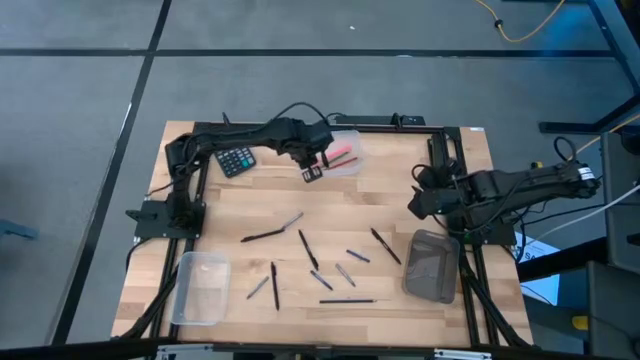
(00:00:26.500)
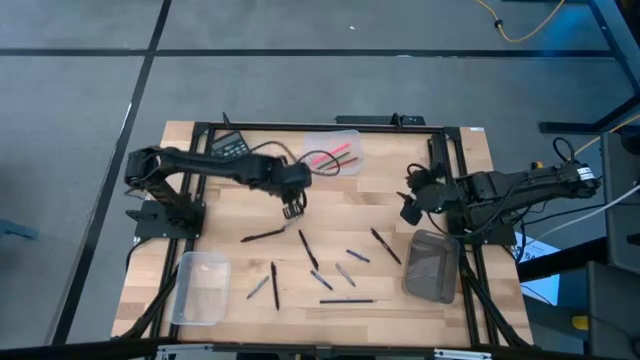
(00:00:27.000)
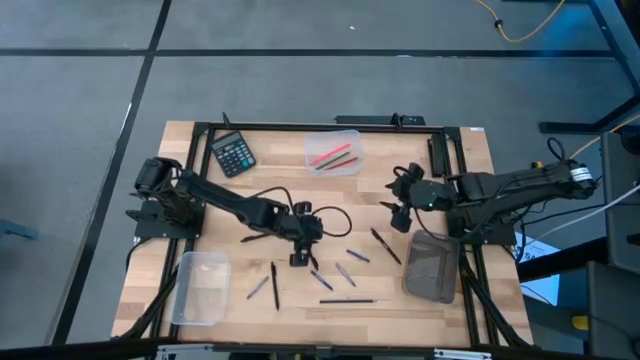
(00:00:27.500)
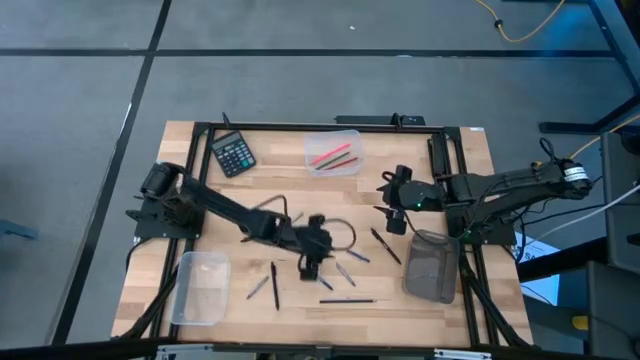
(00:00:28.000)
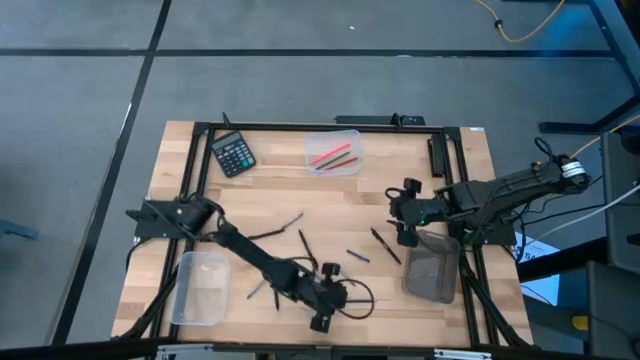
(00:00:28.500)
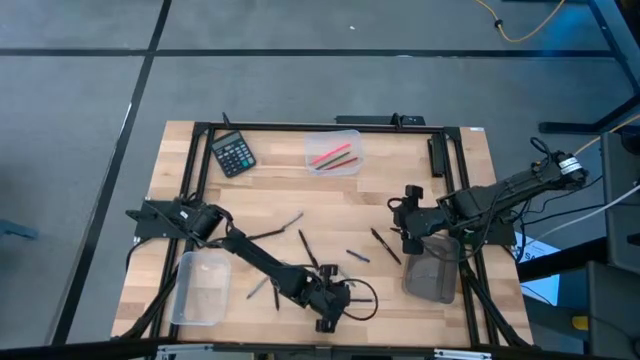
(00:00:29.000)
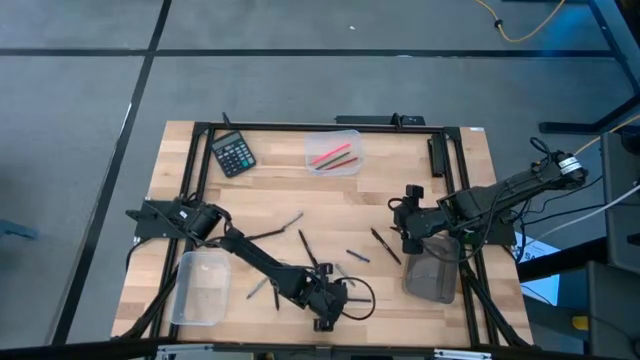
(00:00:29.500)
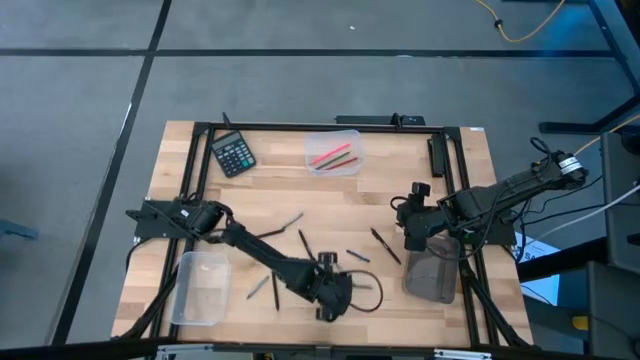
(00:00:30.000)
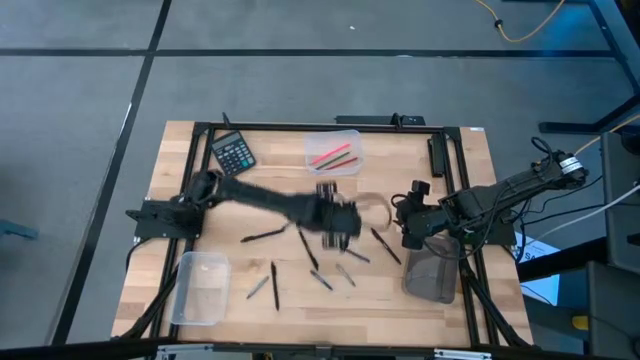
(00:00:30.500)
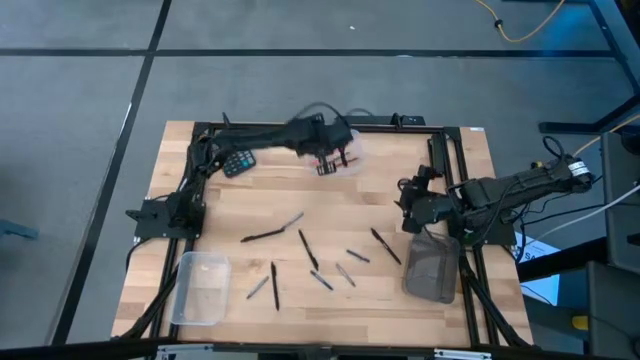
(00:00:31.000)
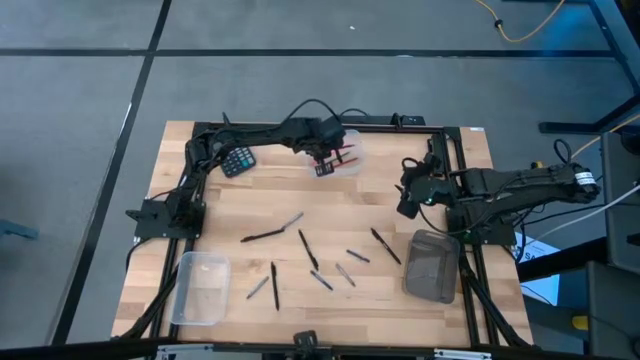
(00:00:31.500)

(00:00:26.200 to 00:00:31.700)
Task: Sort crayons/erasers/pens/pencils in bins
Put the black pencil into the top transparent bin

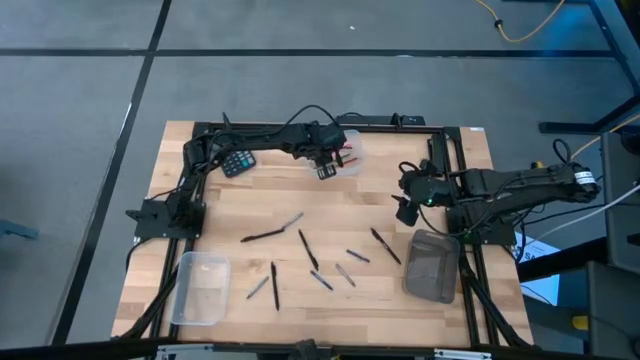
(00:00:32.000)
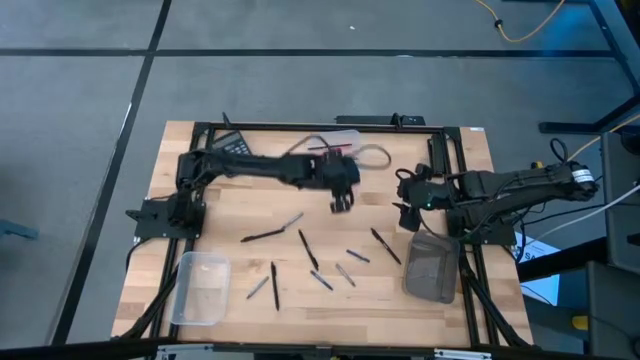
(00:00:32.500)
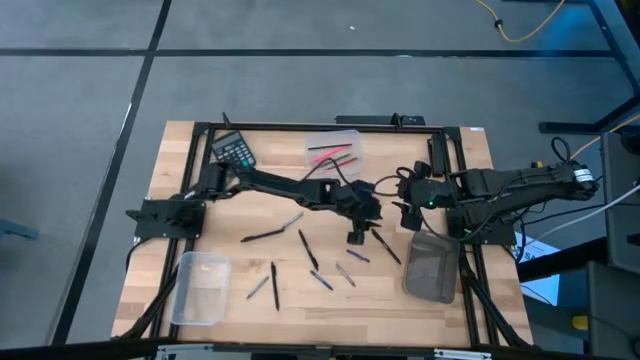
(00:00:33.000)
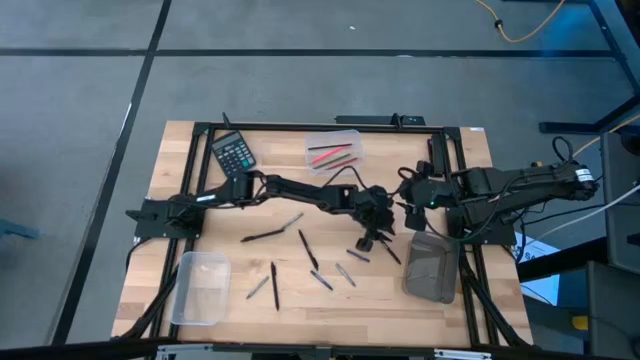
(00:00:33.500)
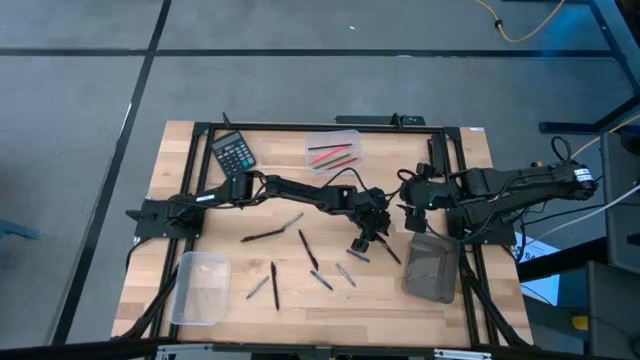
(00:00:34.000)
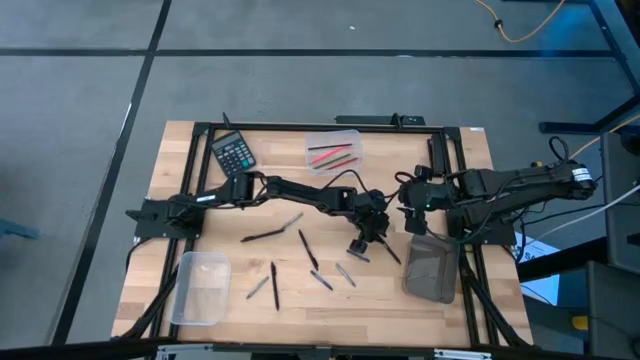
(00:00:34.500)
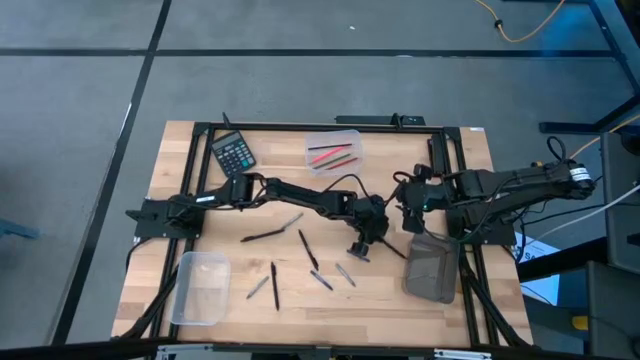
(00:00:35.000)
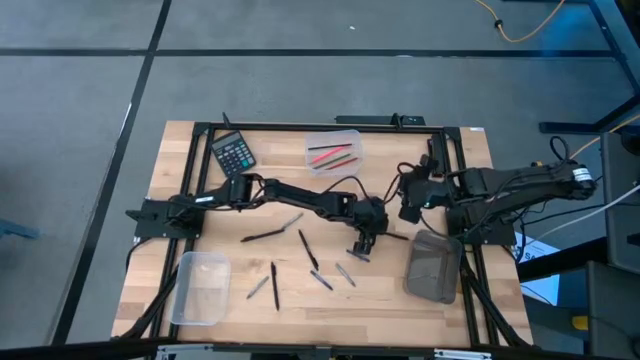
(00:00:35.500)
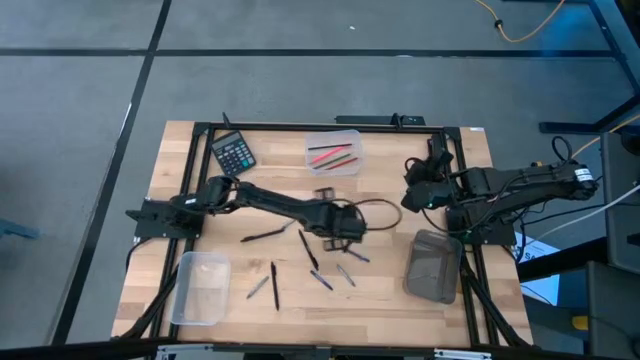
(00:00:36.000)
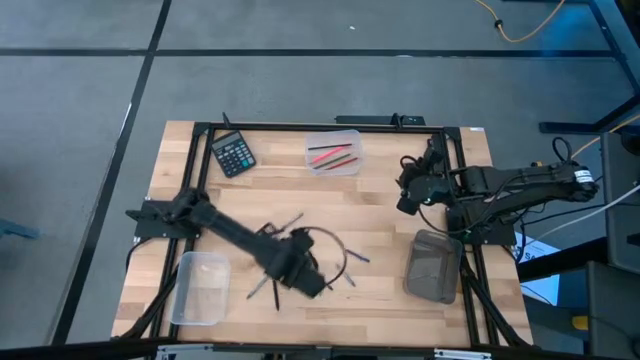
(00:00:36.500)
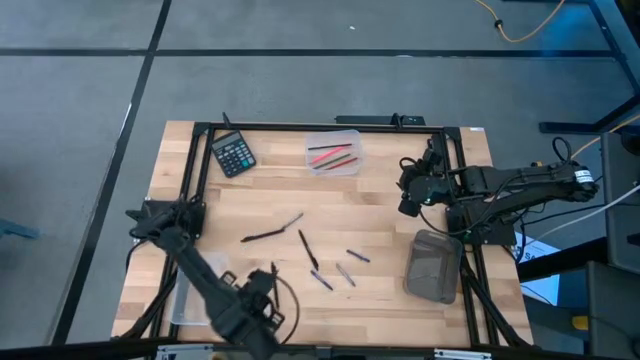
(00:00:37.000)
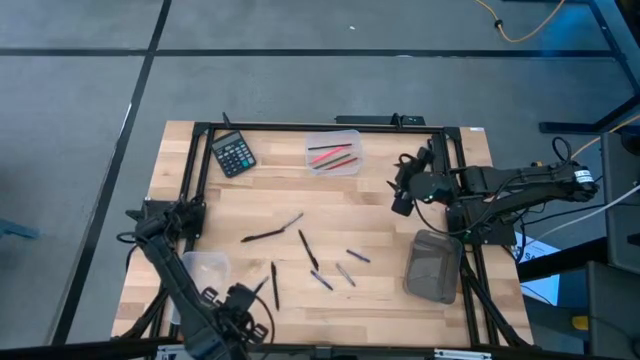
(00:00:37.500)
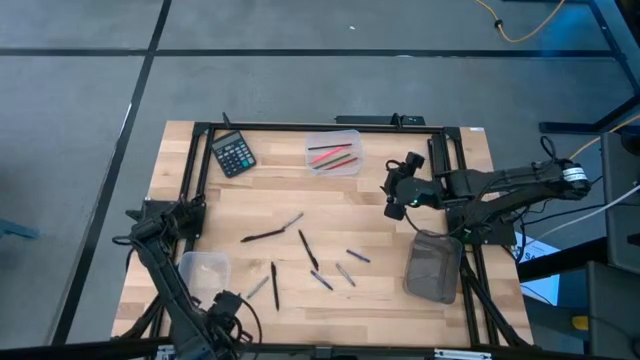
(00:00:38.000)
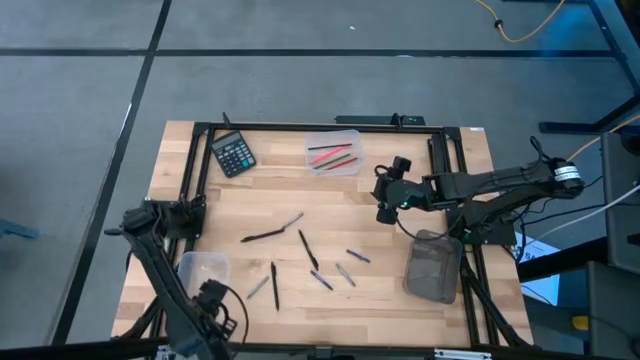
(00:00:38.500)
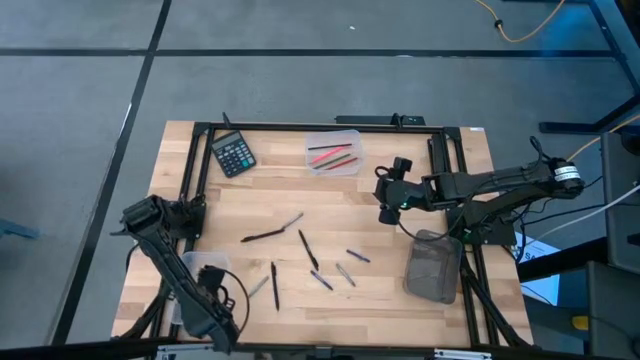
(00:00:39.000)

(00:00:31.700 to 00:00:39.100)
Put the black pen into the bottom transparent bin

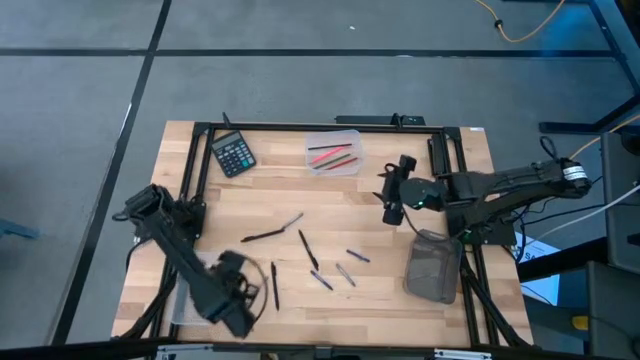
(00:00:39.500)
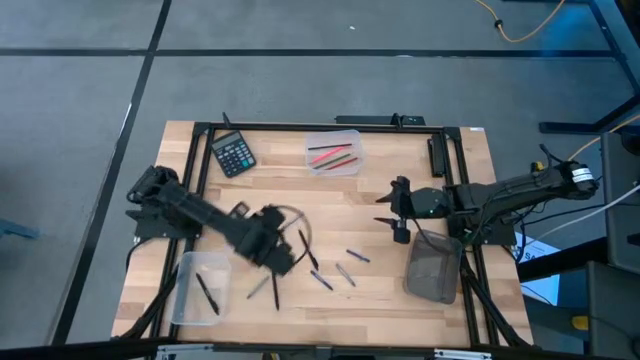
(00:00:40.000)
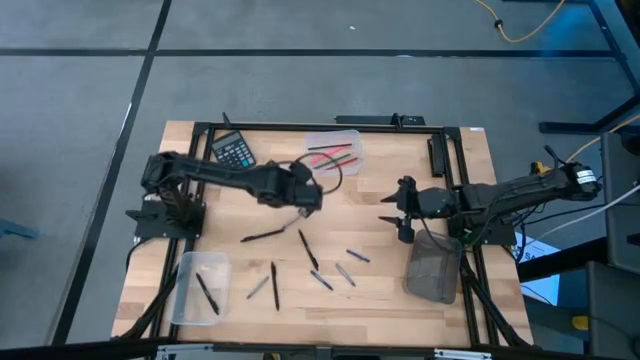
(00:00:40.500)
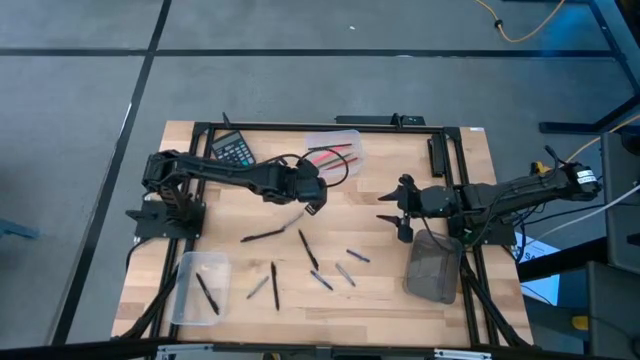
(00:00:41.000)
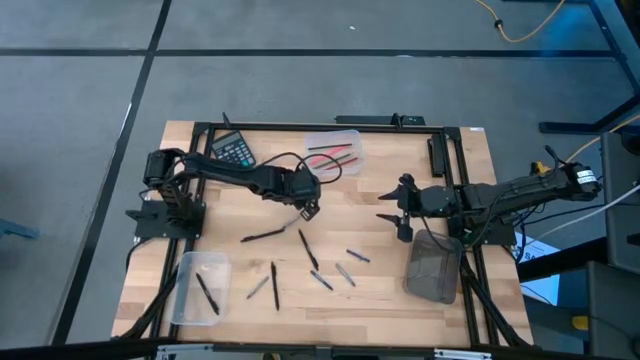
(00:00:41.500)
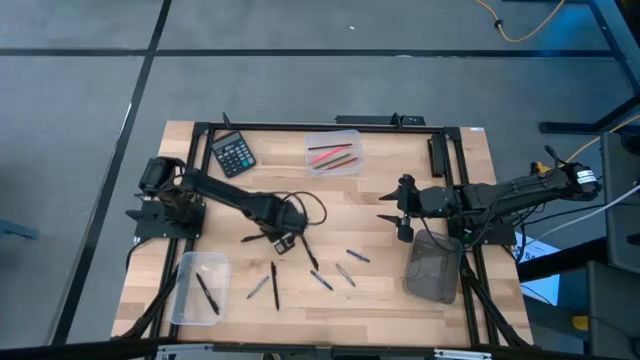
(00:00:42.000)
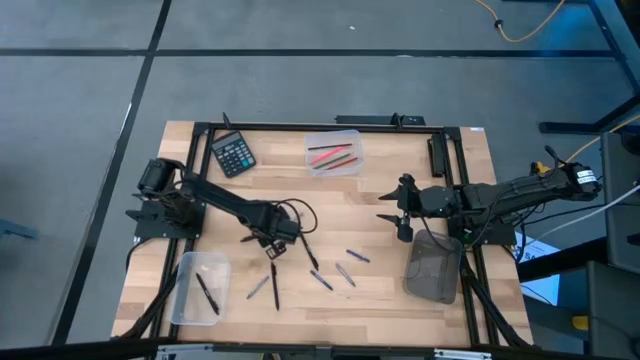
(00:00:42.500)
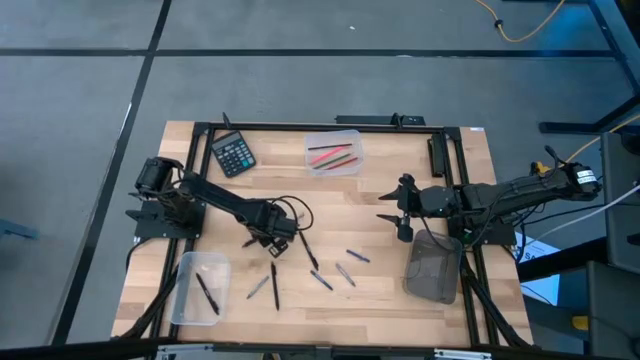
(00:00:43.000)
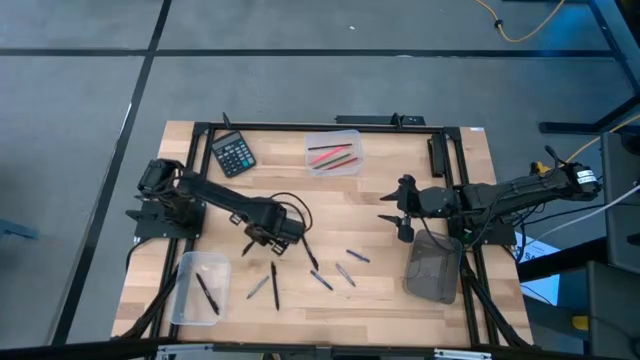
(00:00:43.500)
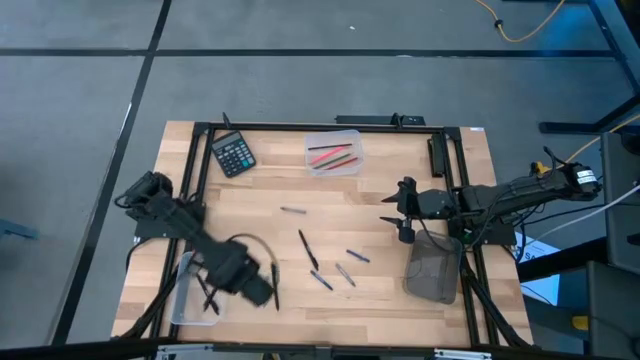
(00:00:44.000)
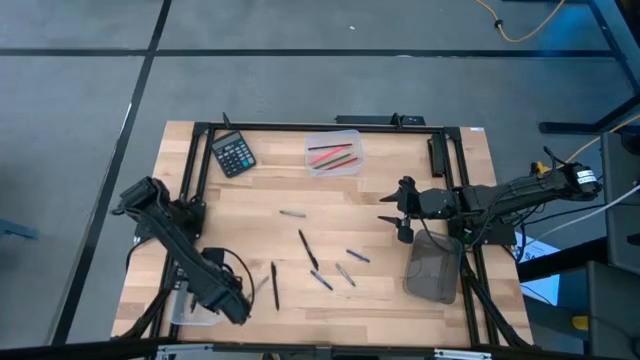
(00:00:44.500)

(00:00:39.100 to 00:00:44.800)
Put the black pen into the bottom transparent bin

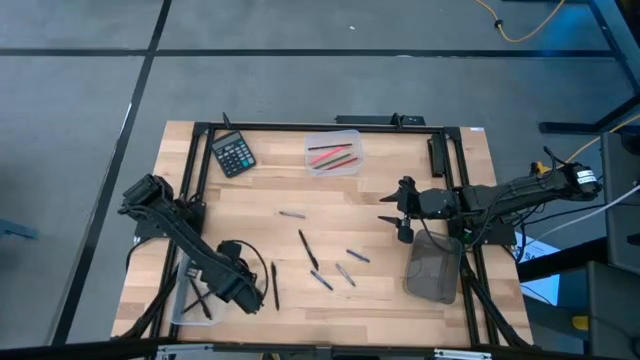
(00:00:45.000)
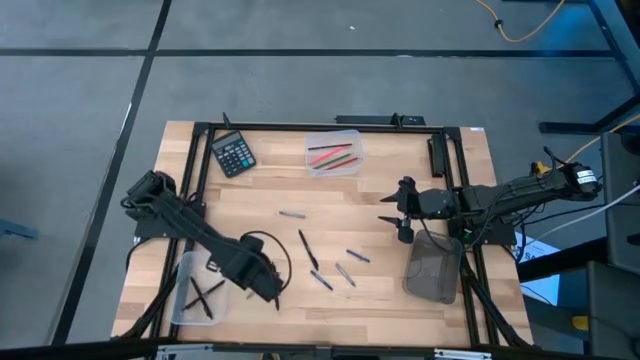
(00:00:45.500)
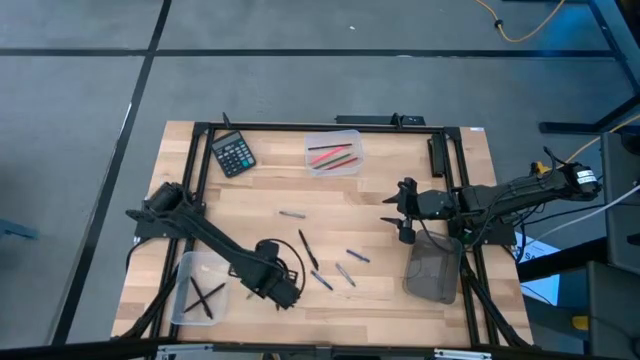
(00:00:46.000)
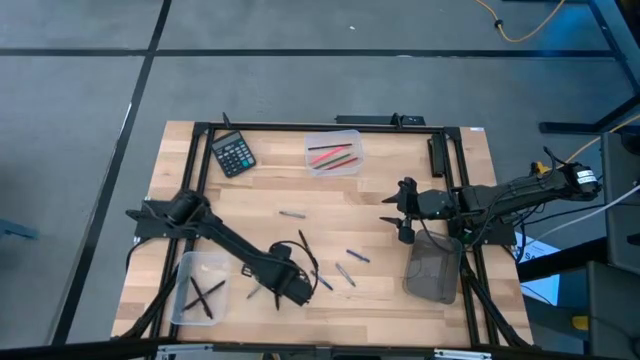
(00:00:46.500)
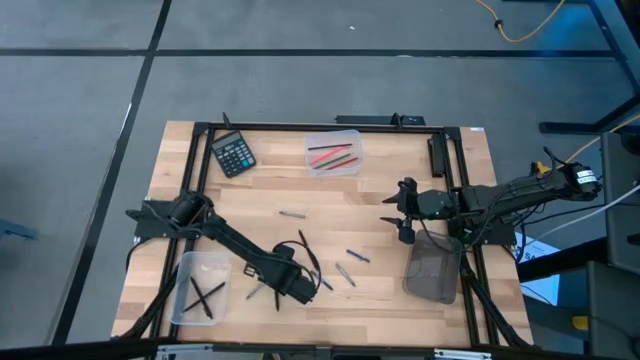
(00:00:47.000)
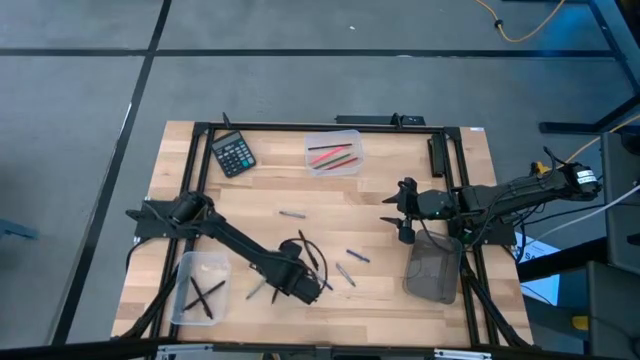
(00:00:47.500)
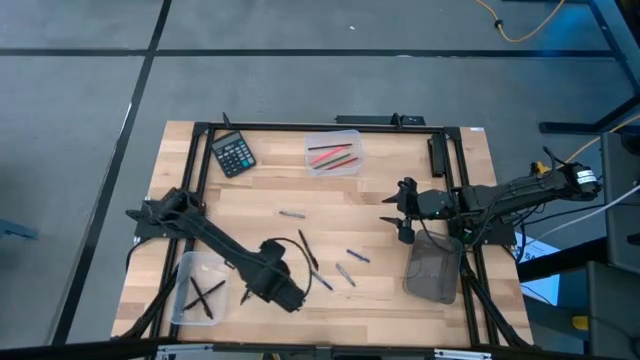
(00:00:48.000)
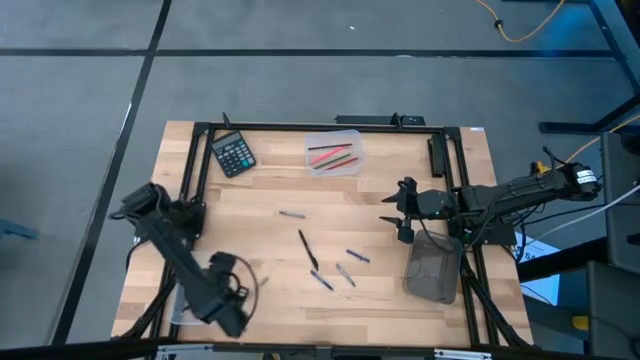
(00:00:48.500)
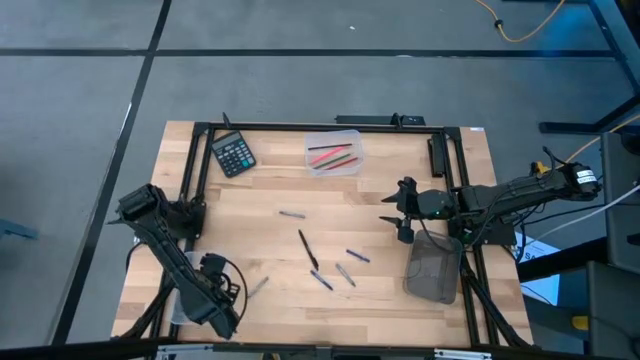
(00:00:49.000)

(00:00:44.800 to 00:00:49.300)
Put the black pen into the bottom transparent bin
